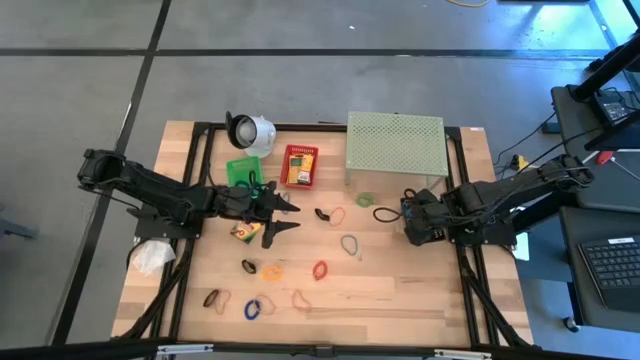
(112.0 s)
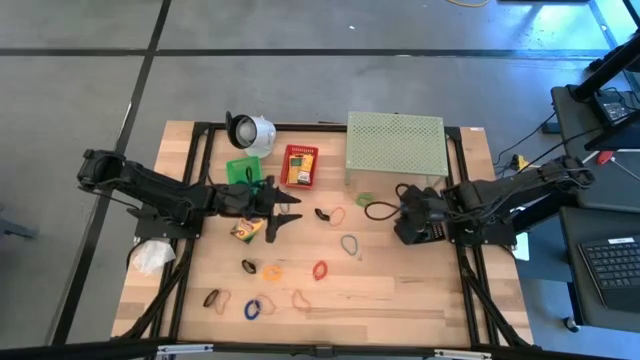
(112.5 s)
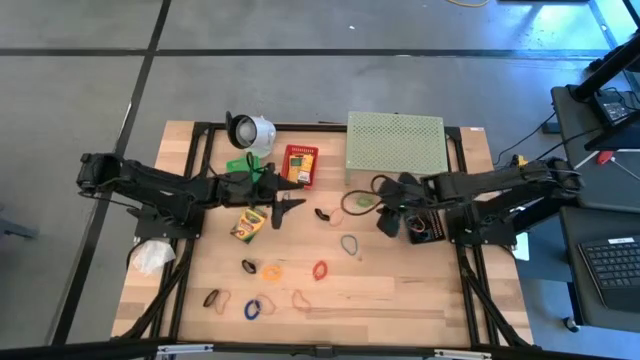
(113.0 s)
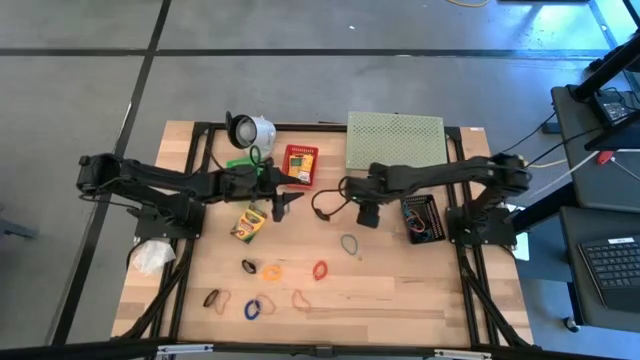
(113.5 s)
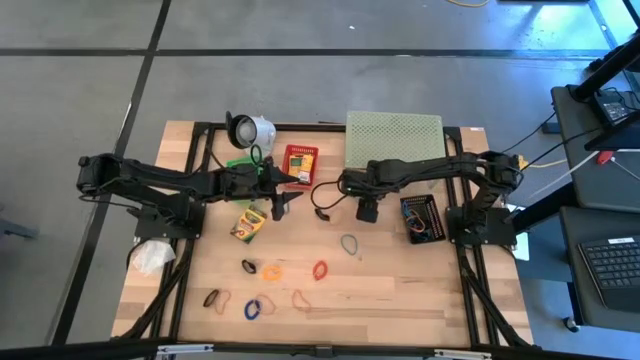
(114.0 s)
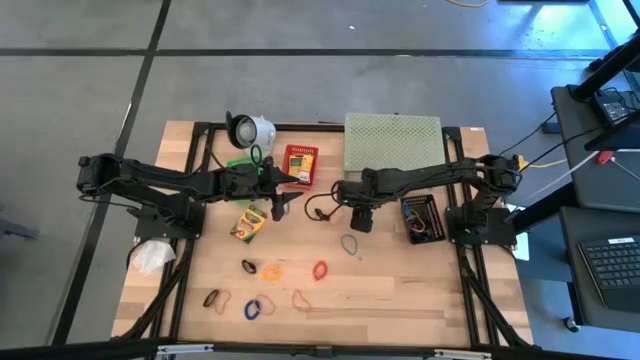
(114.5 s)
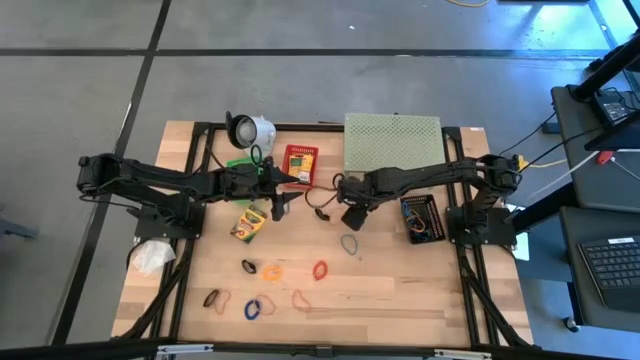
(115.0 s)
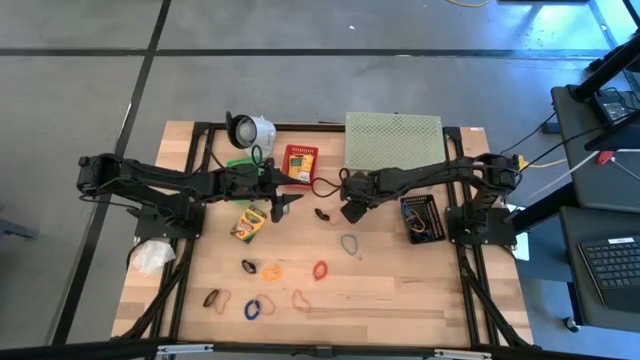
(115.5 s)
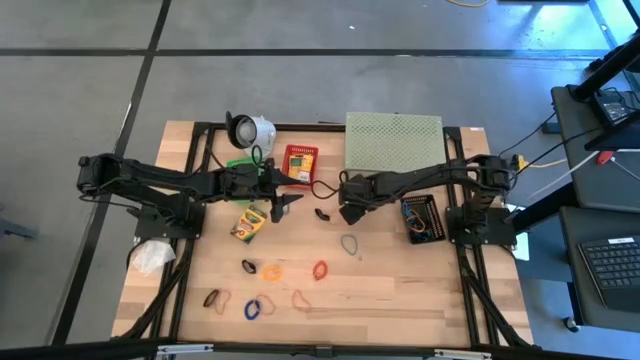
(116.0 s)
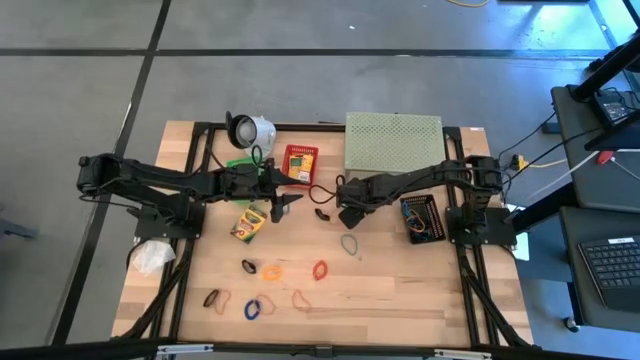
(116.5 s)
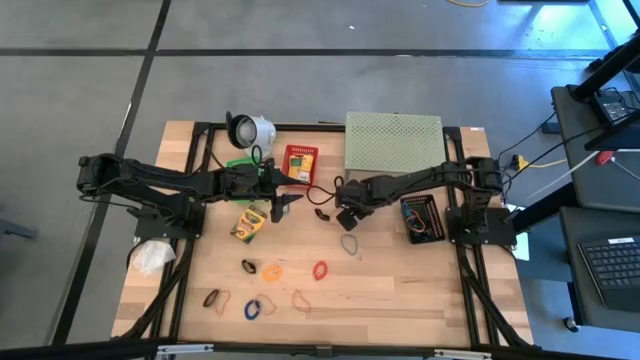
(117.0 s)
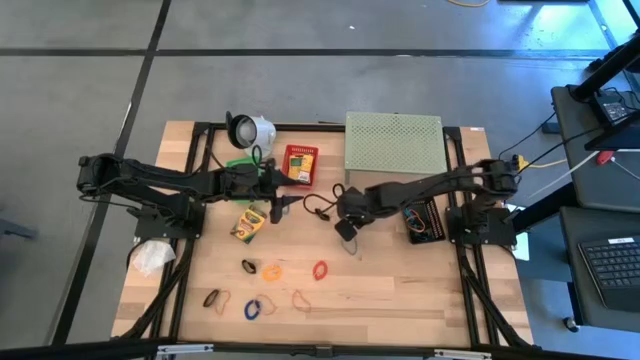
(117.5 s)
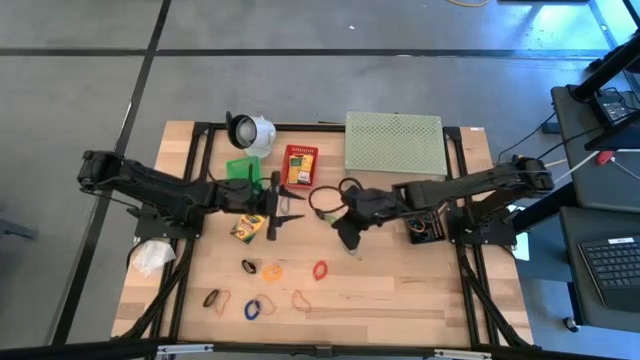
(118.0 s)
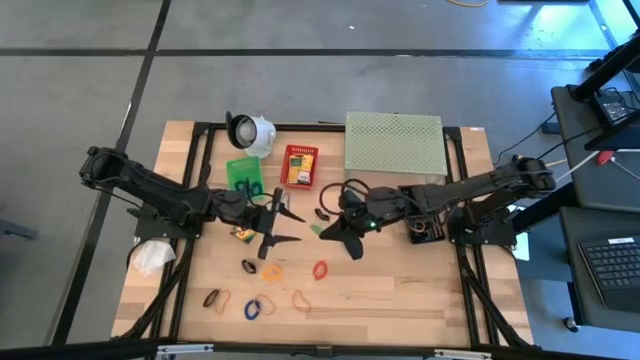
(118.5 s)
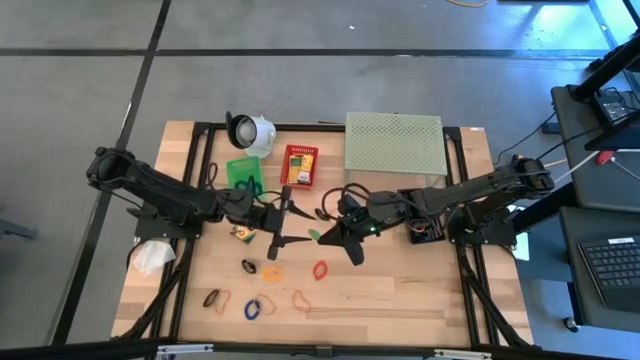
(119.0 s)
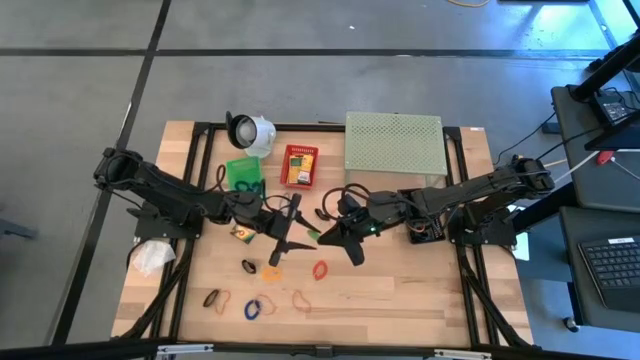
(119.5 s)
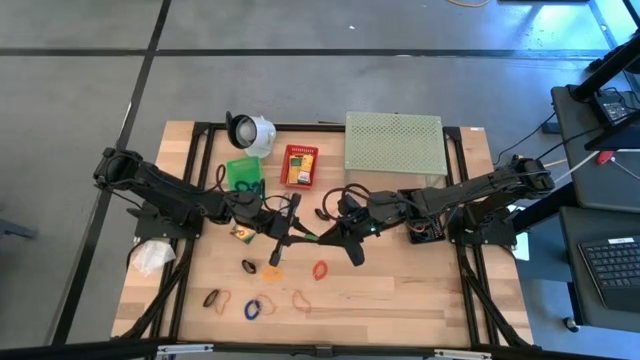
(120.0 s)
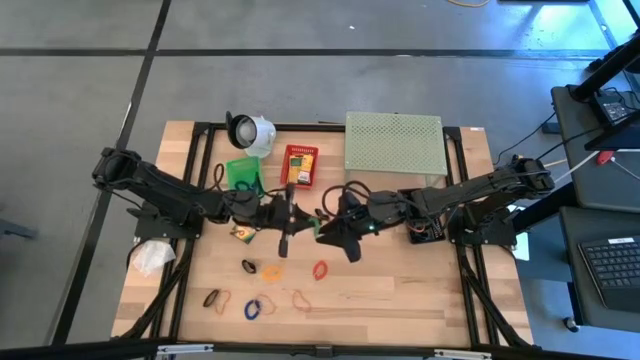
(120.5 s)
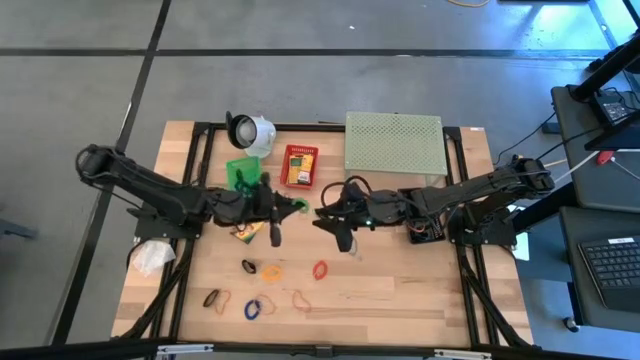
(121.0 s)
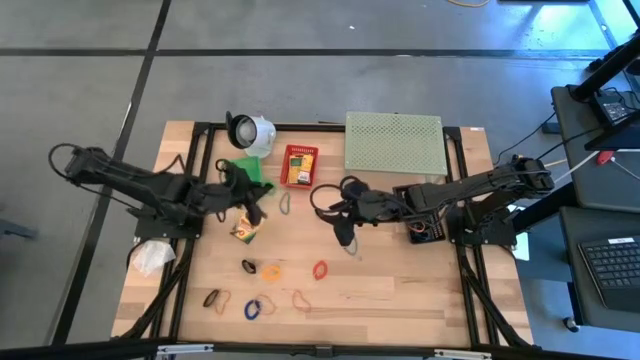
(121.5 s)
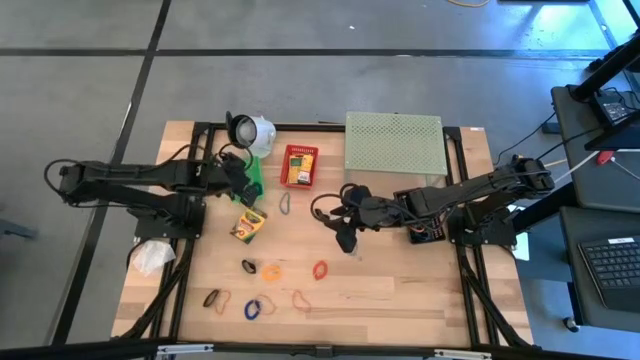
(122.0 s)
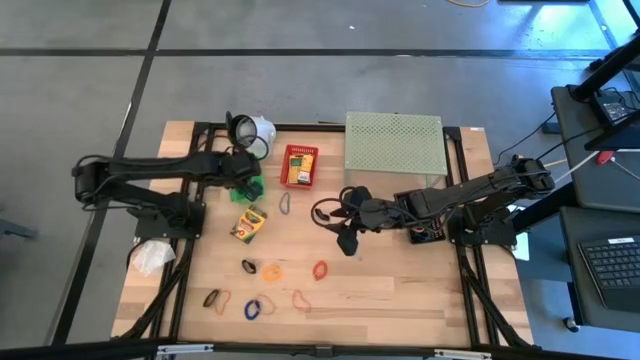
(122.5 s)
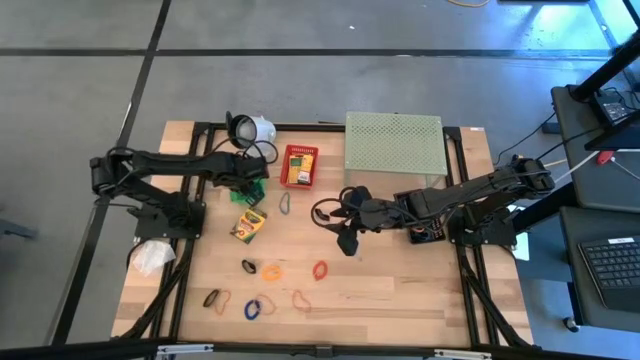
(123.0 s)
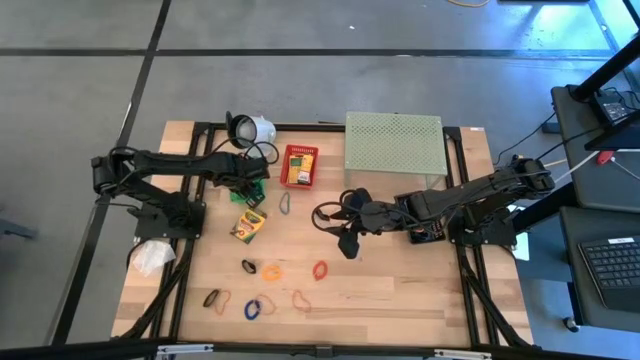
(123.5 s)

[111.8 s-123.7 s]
Task: Pick & Place Office Desk Supplies
Put the green spring keychain into the green basket

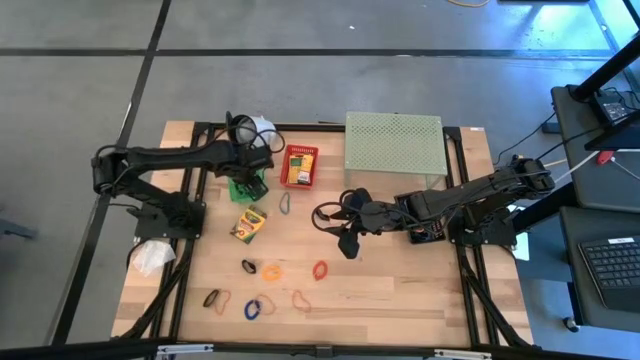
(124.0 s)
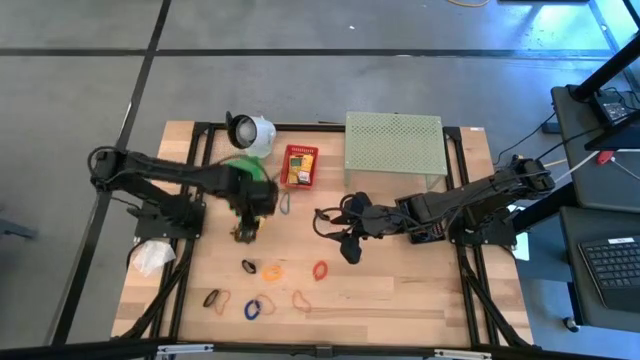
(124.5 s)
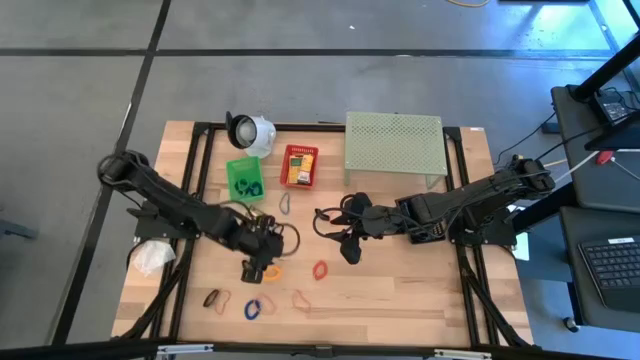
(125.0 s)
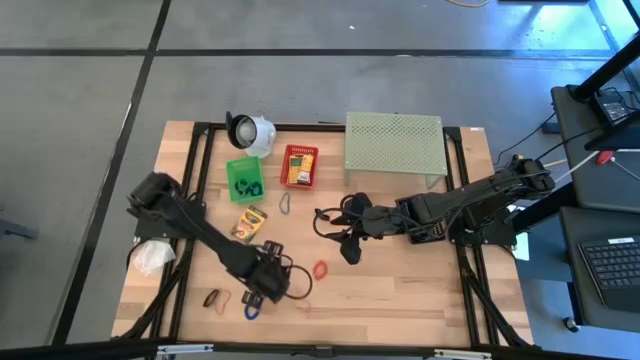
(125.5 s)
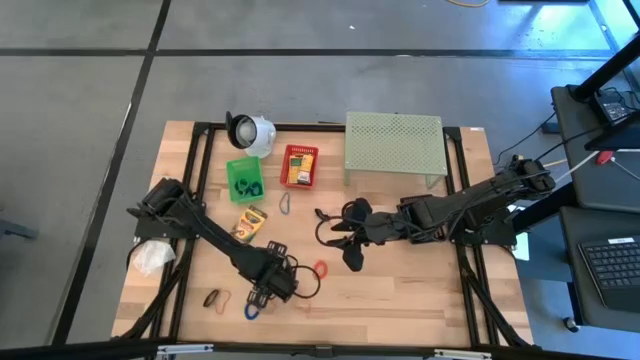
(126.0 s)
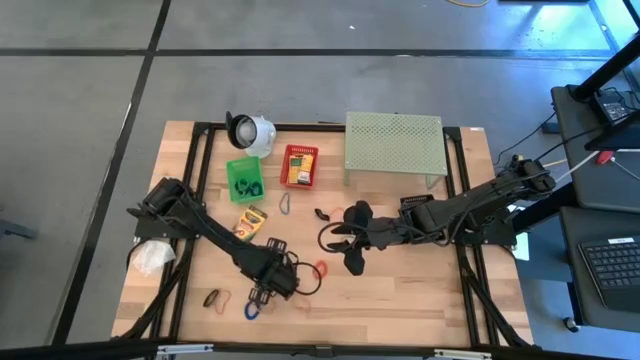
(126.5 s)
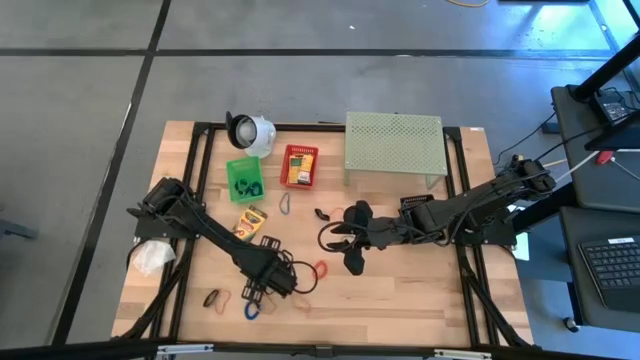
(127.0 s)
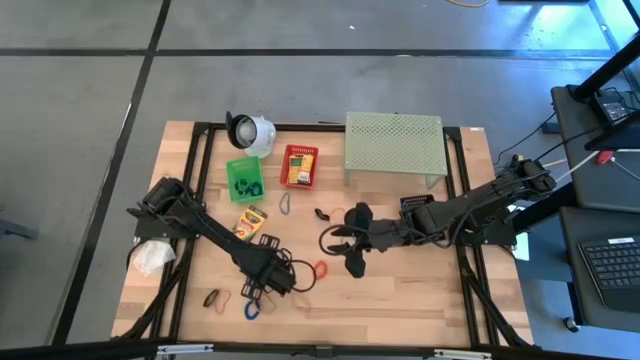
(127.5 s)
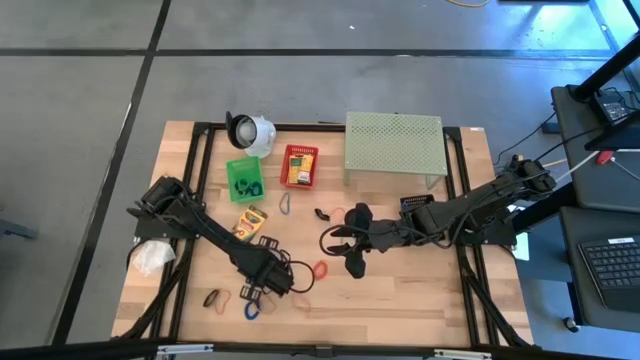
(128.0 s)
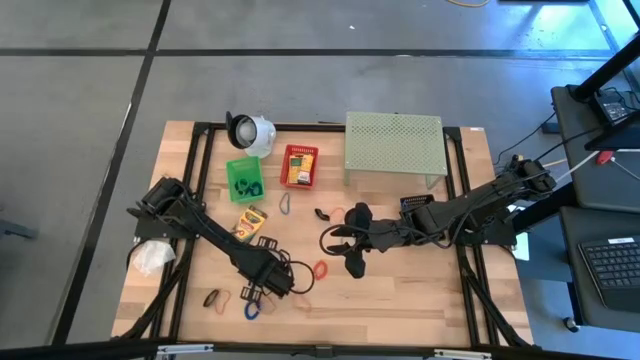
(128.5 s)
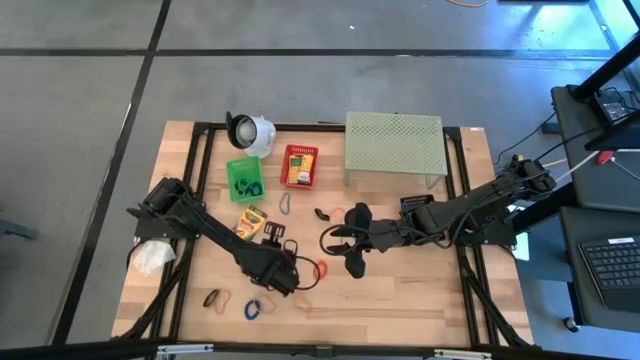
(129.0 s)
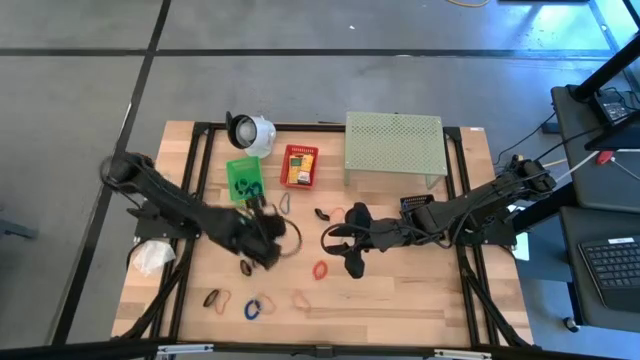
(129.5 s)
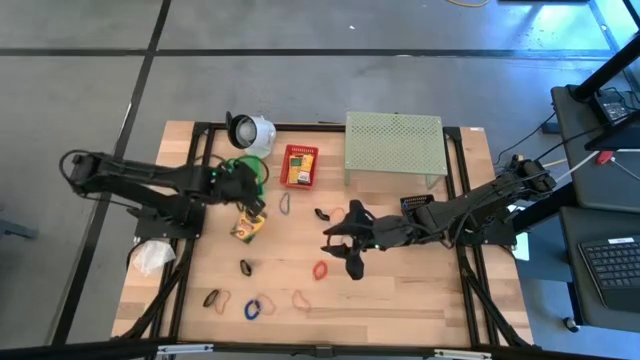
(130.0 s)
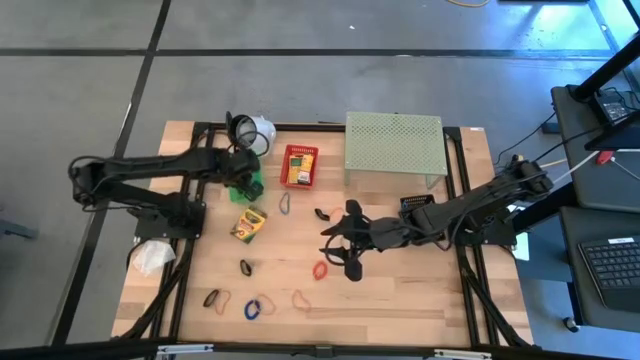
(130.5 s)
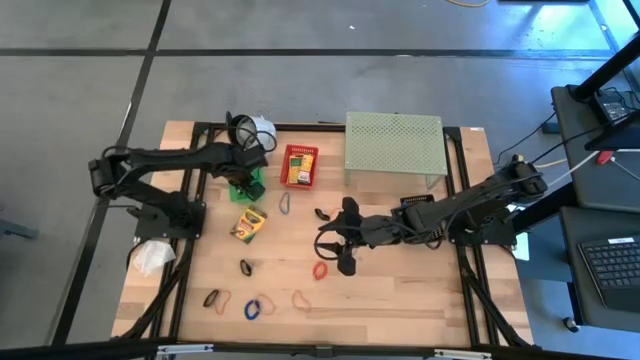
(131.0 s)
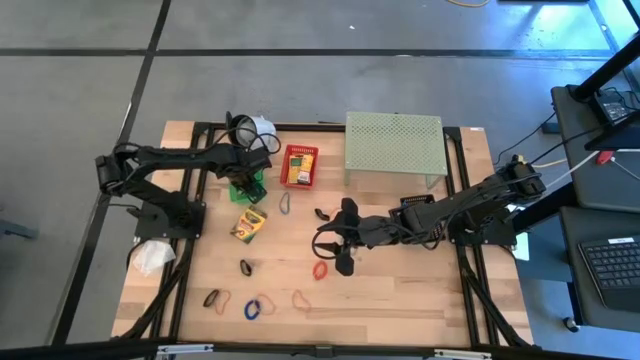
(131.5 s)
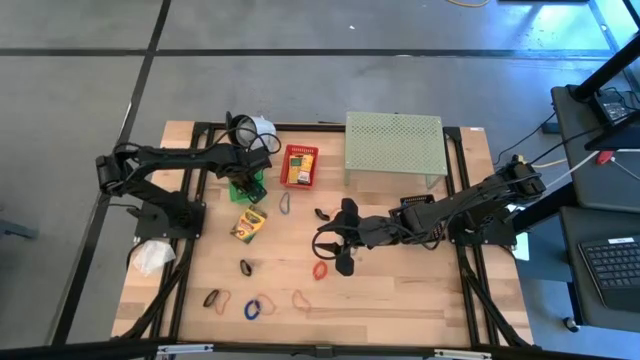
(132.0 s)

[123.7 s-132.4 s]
Put the yellow spring keychain into the green basket
